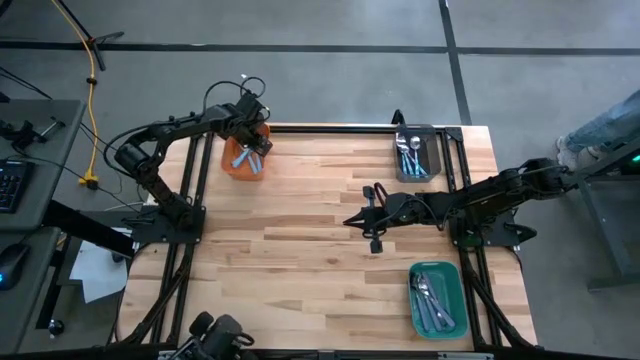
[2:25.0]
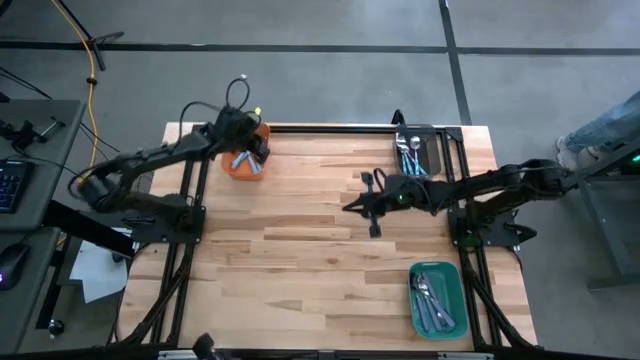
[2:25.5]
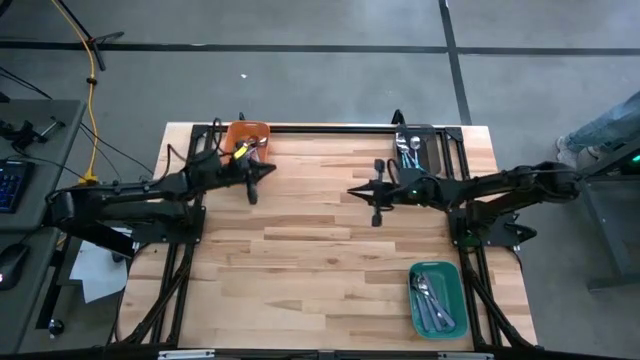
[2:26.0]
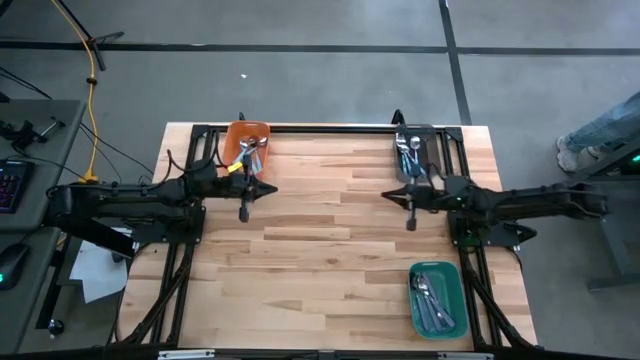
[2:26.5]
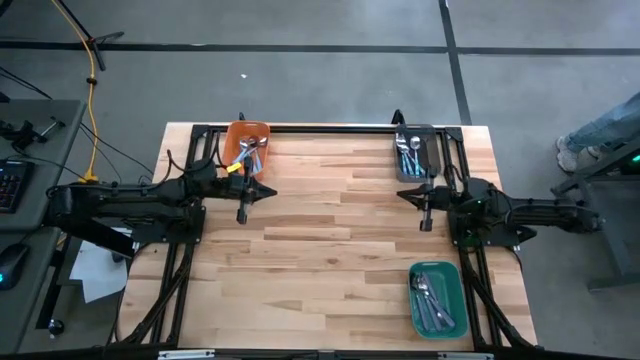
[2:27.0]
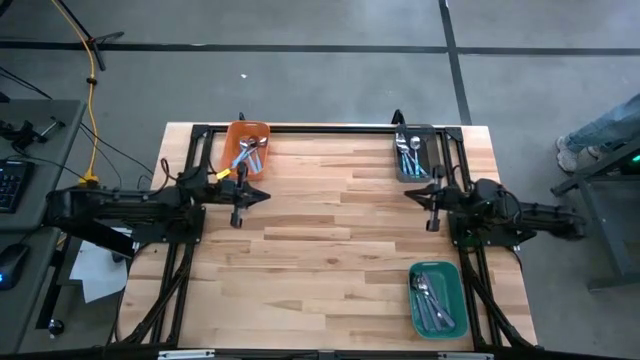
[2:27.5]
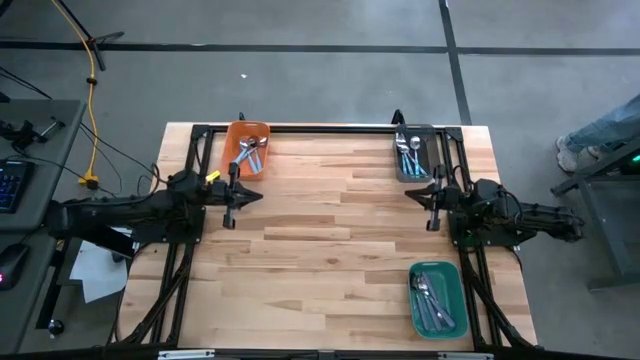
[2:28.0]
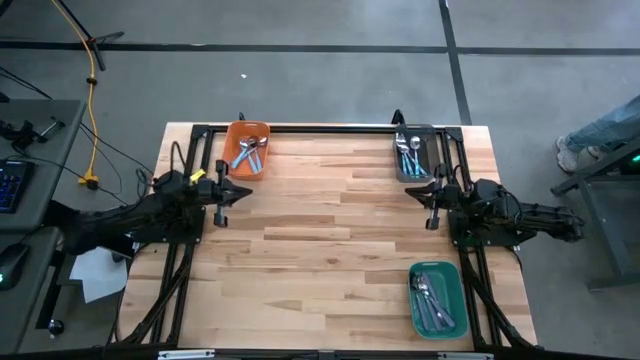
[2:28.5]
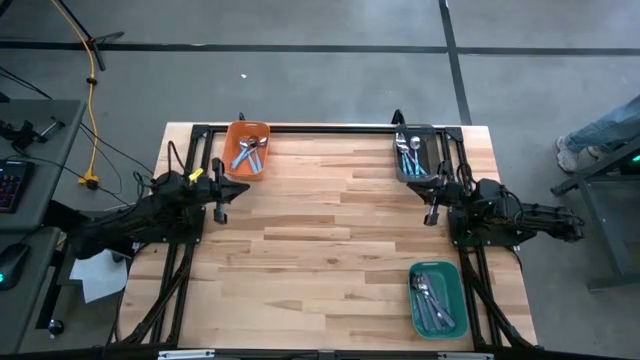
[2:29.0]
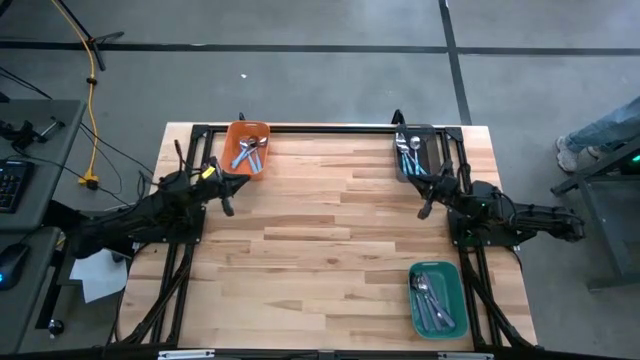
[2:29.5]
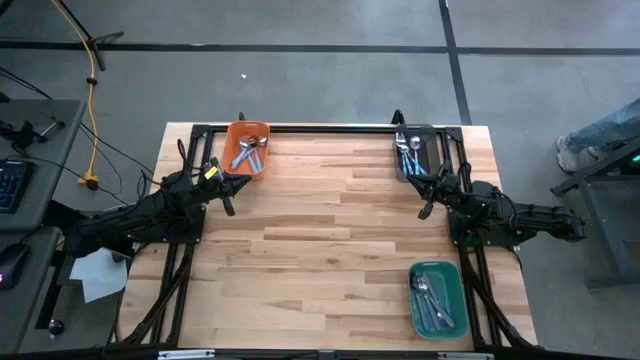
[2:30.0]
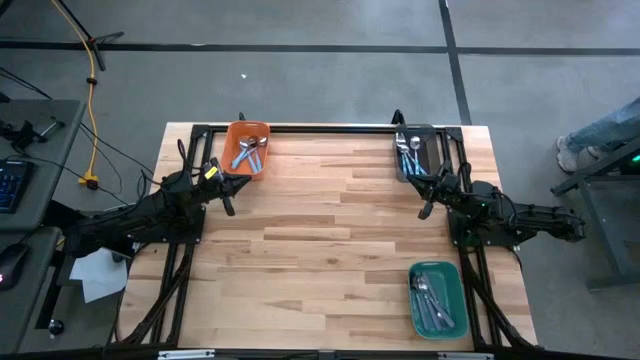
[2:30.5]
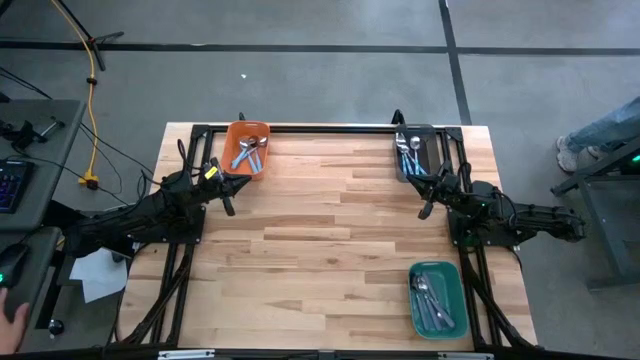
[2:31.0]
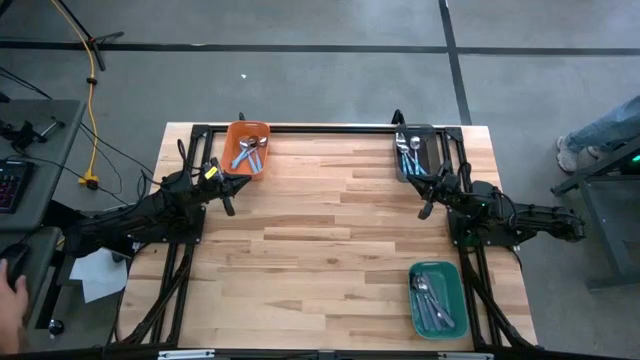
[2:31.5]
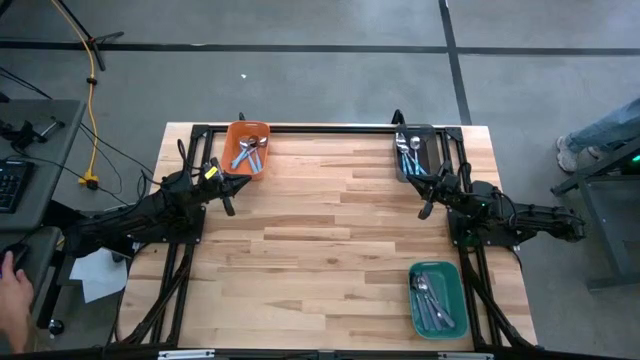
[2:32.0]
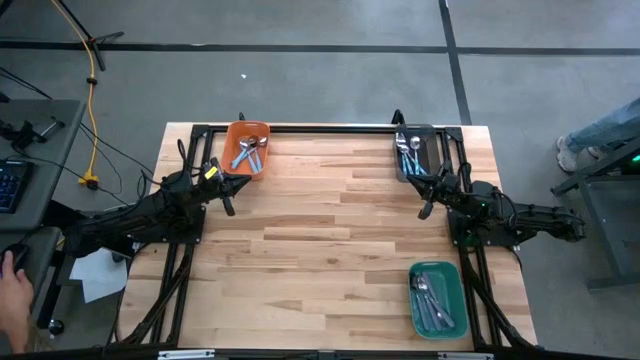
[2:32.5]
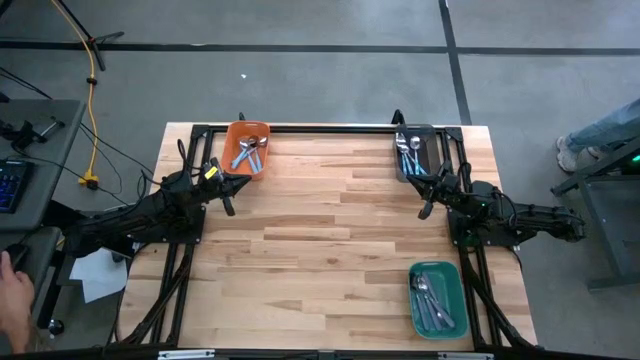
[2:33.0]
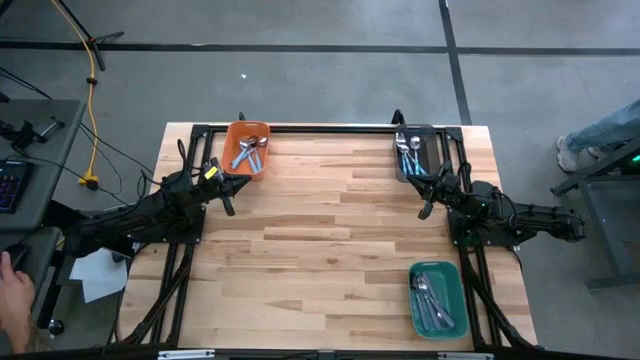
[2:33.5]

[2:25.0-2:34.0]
Task: Sort silverware by color (type)
Return to Home Position

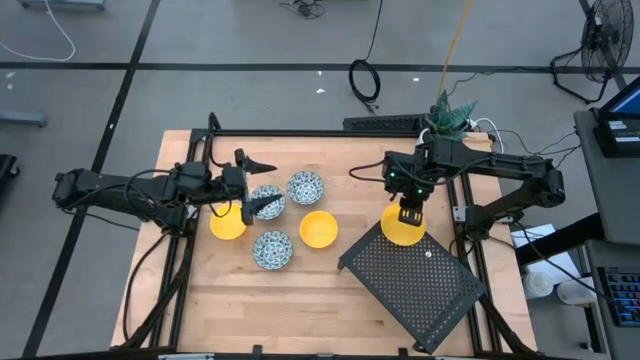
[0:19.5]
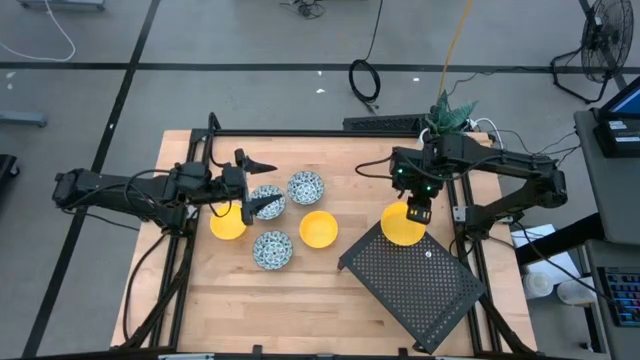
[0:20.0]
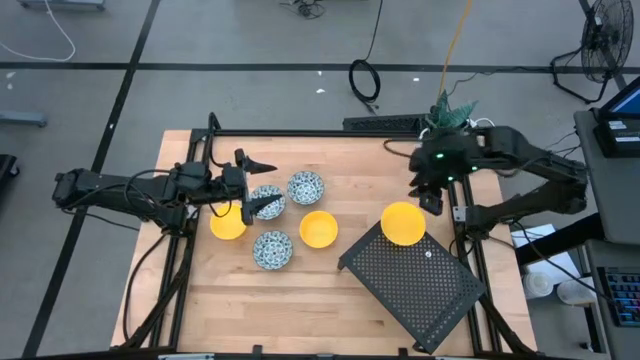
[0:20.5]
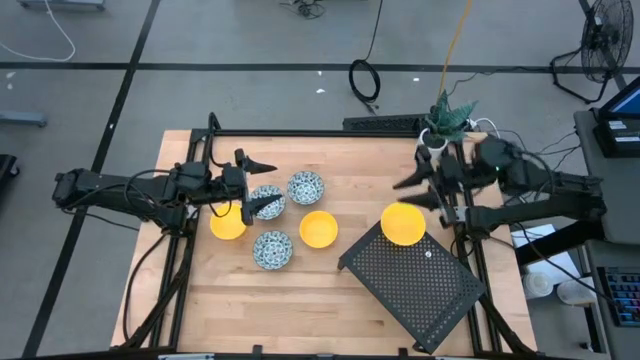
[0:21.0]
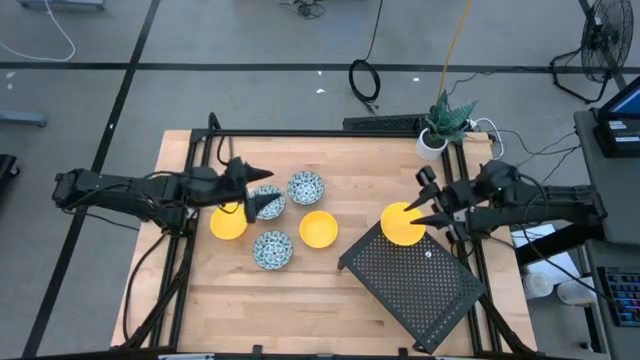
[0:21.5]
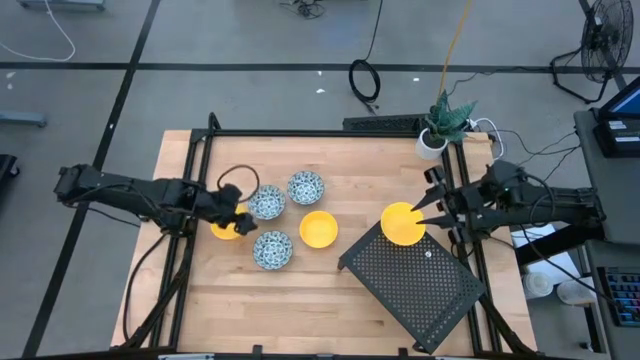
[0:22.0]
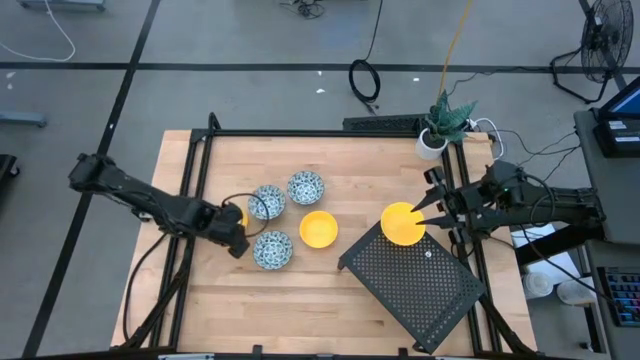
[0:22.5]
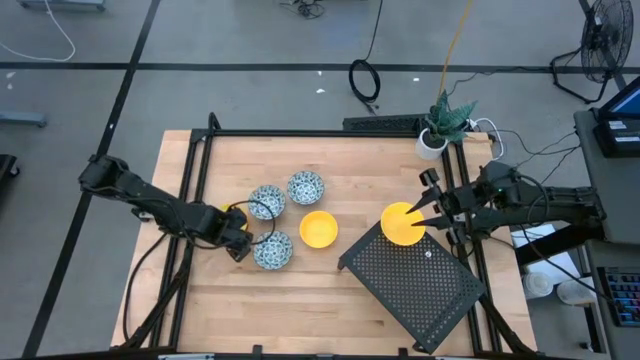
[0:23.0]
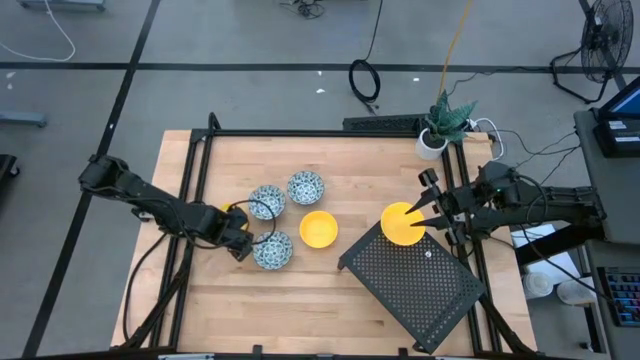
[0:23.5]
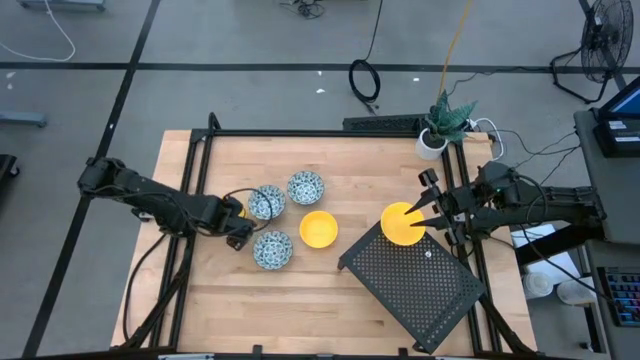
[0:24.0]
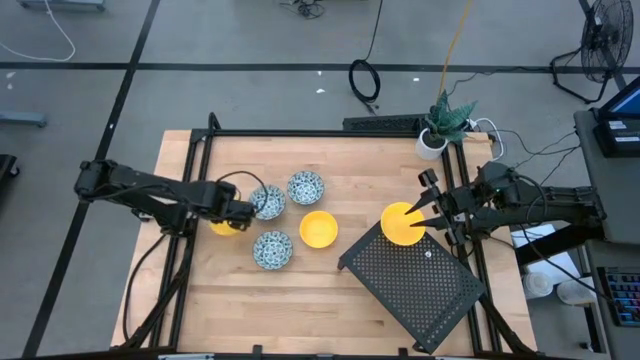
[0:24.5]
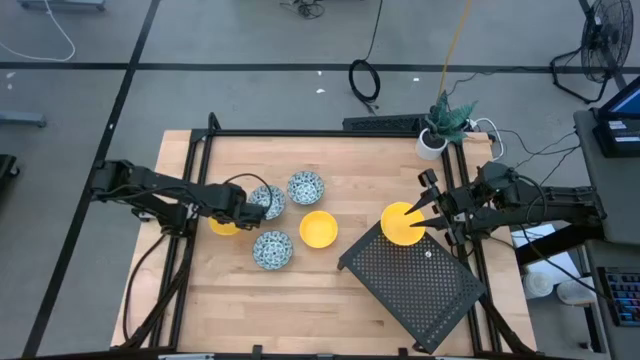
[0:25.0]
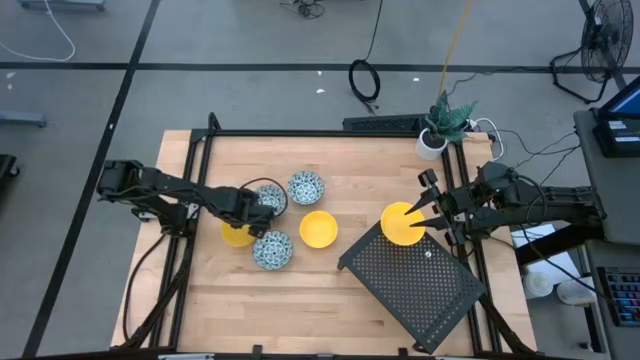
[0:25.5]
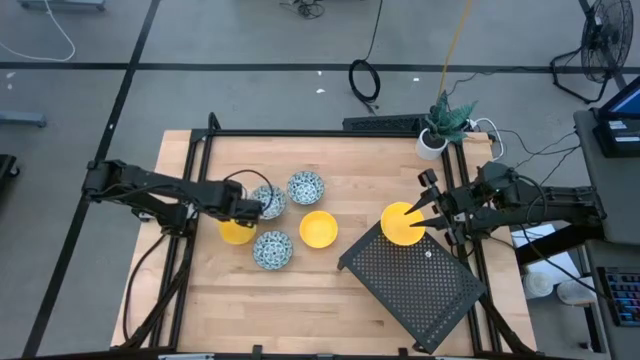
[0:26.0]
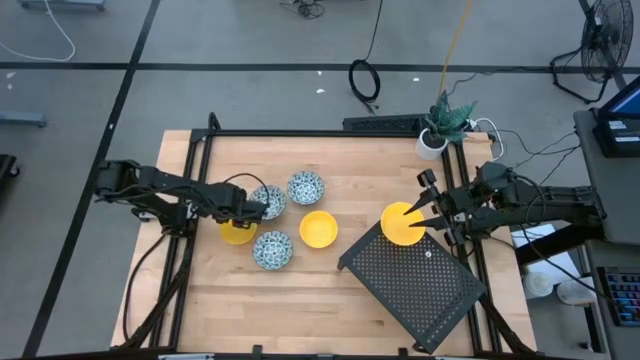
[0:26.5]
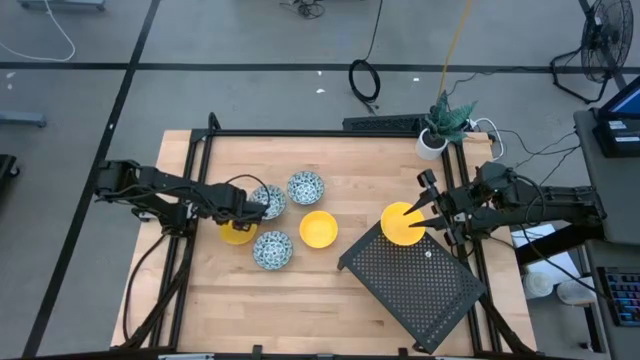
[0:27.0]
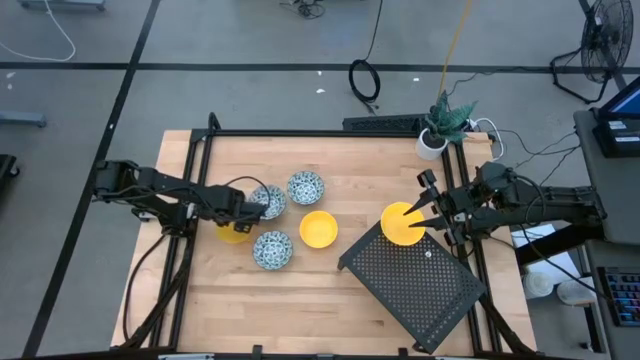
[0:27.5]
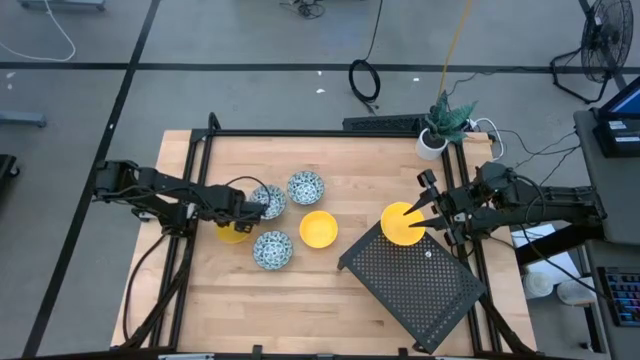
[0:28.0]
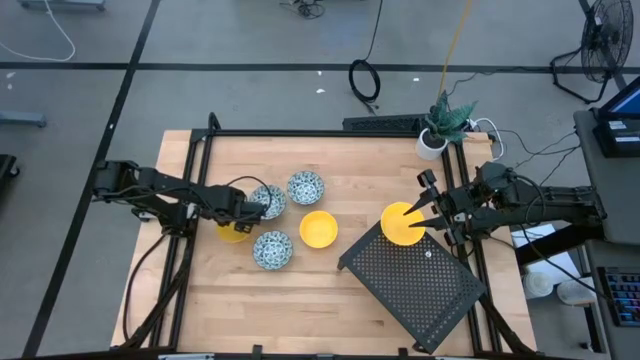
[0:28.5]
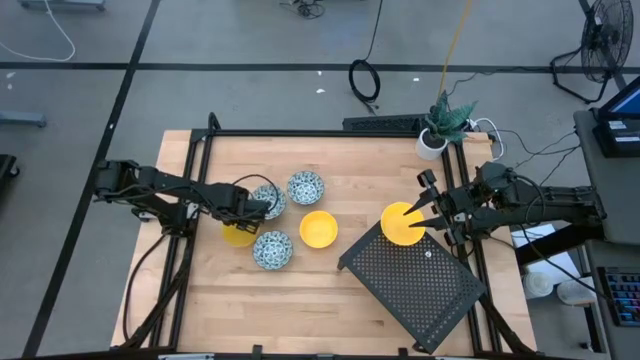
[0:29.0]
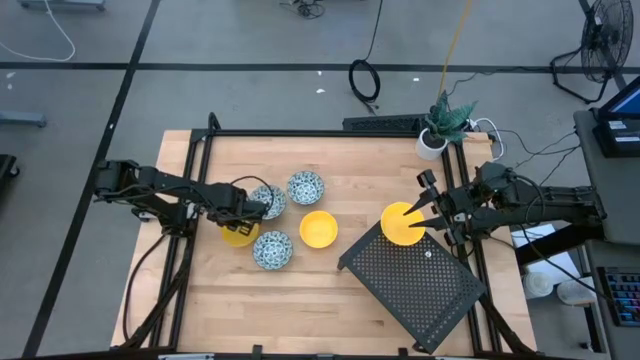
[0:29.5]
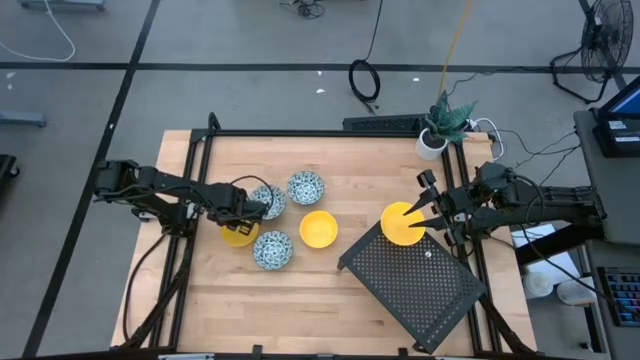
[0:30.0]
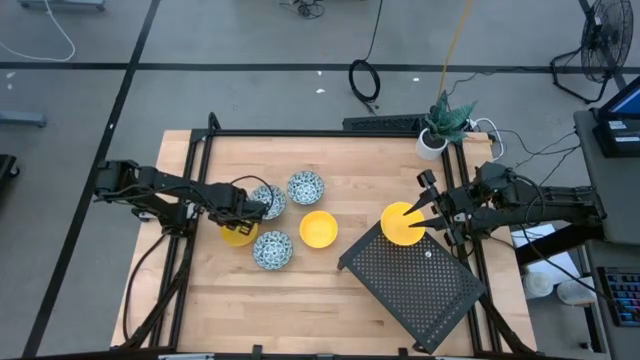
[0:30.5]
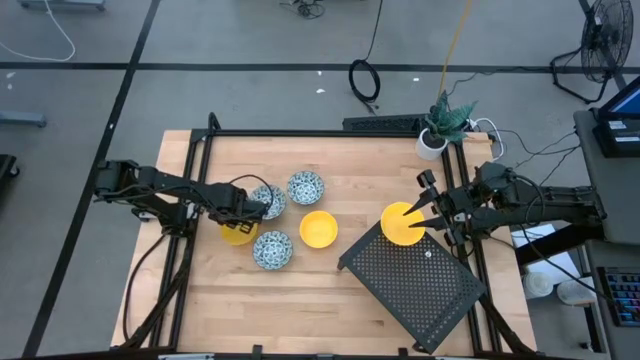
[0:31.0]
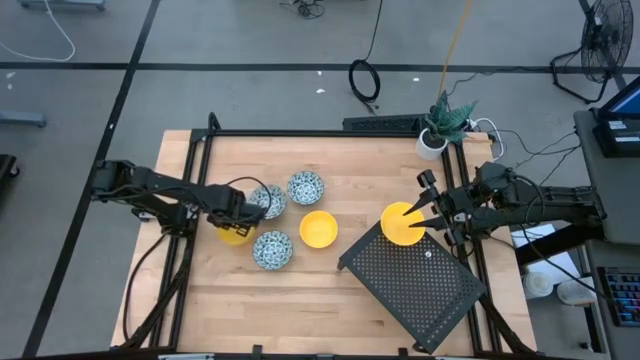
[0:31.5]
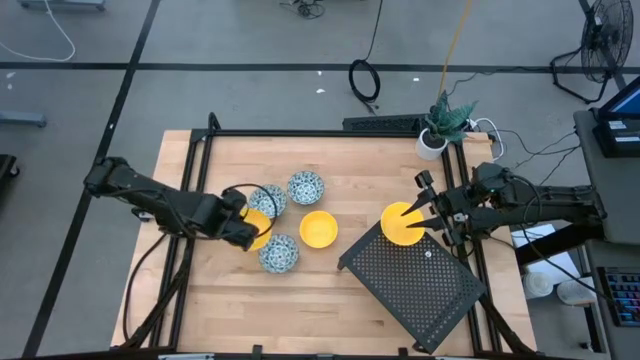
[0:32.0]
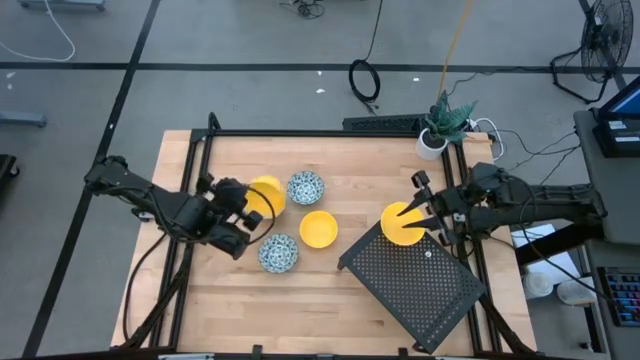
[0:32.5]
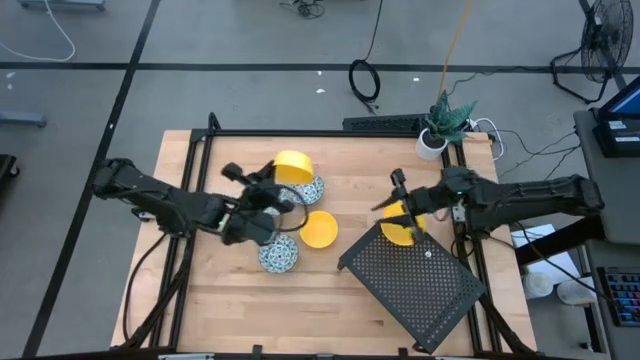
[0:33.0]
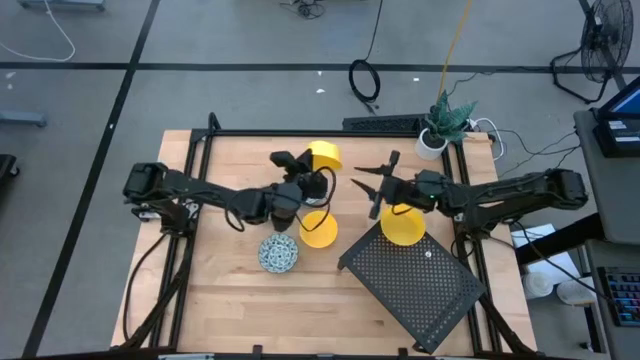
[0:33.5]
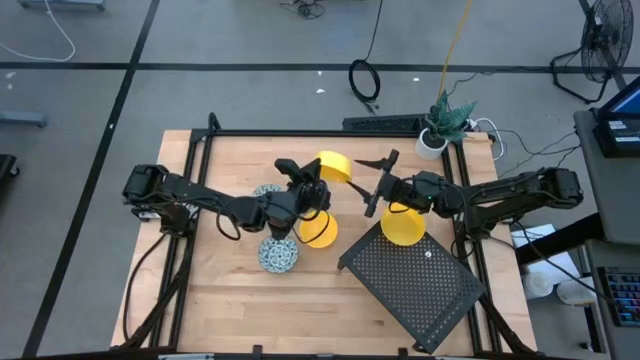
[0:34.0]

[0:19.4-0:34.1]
Task: Pick & Place Mini bowls
Stack the left yellow bowl on top of the yellow bowl on the shelf
